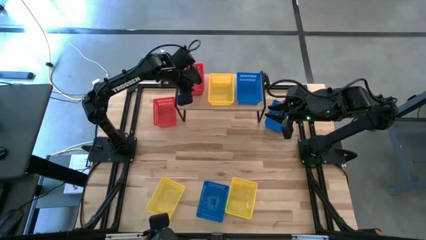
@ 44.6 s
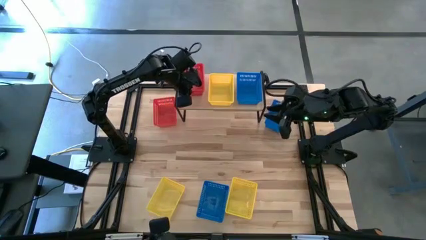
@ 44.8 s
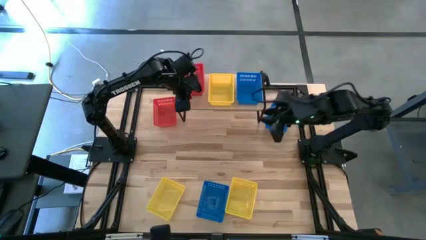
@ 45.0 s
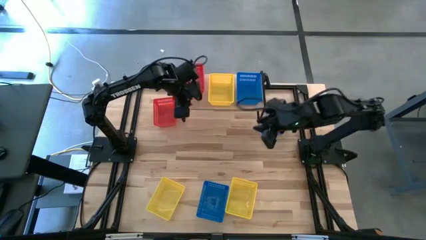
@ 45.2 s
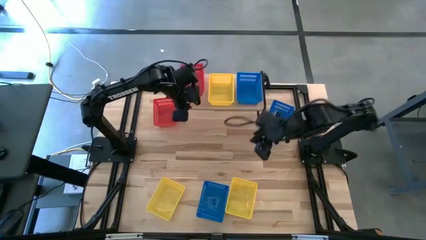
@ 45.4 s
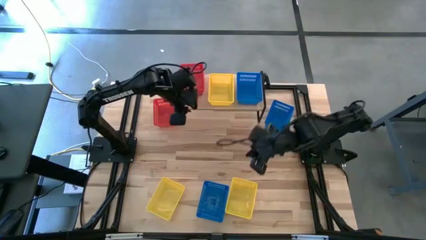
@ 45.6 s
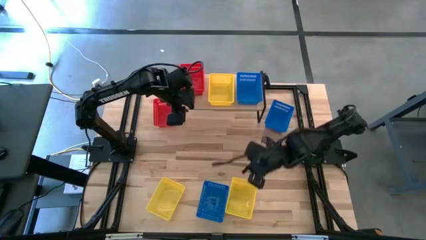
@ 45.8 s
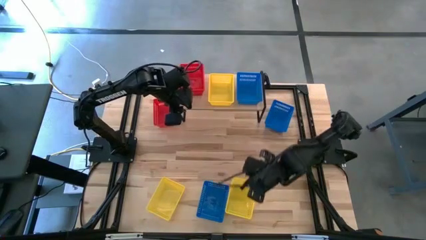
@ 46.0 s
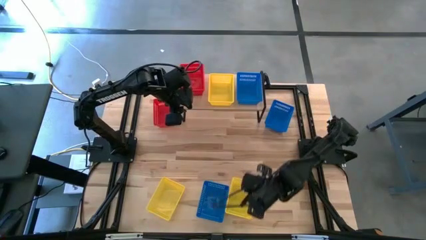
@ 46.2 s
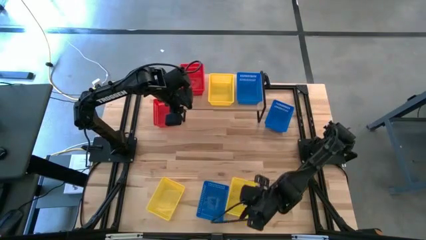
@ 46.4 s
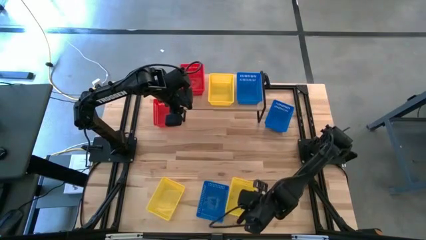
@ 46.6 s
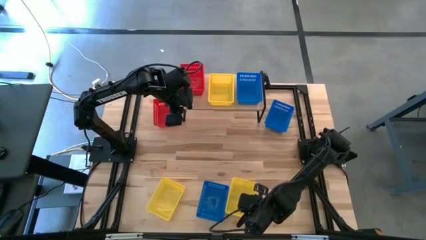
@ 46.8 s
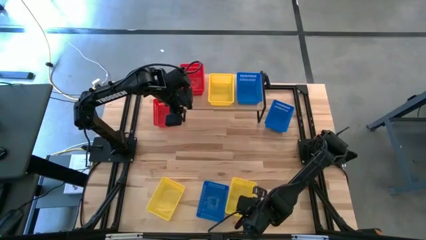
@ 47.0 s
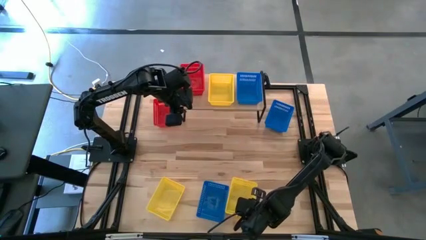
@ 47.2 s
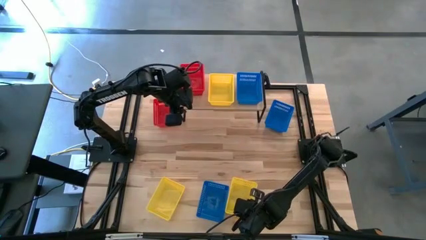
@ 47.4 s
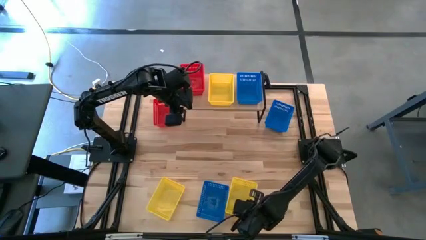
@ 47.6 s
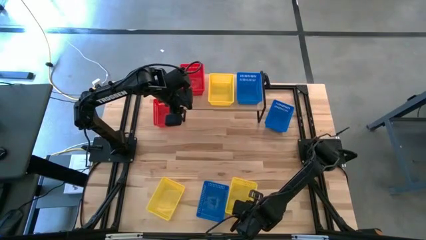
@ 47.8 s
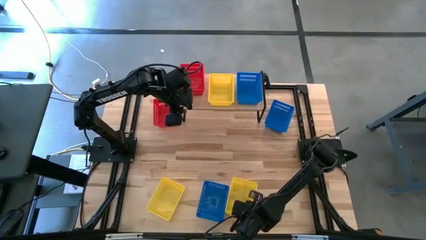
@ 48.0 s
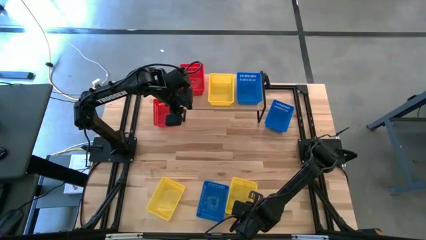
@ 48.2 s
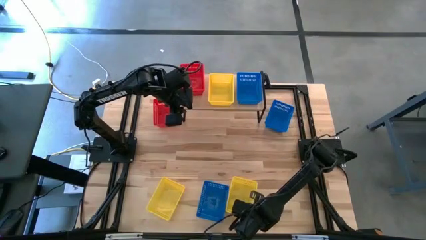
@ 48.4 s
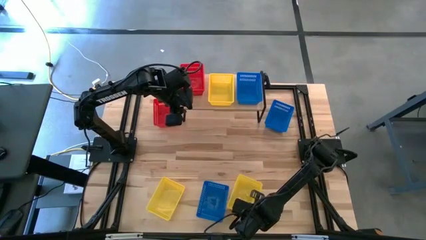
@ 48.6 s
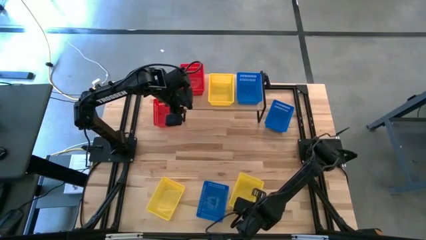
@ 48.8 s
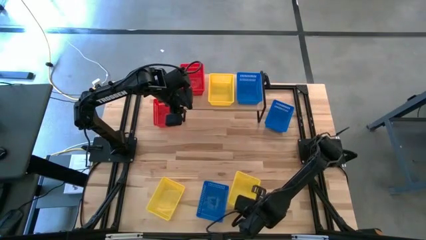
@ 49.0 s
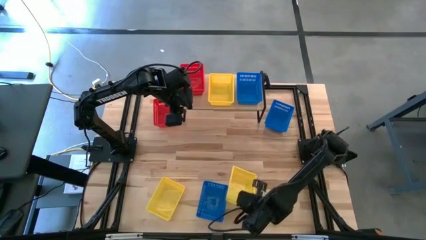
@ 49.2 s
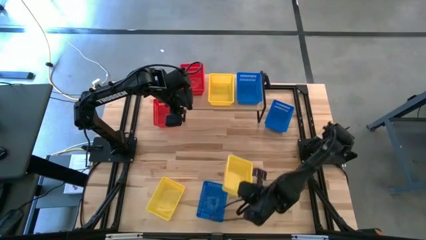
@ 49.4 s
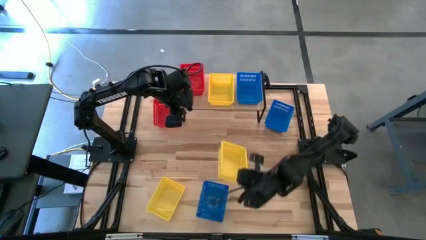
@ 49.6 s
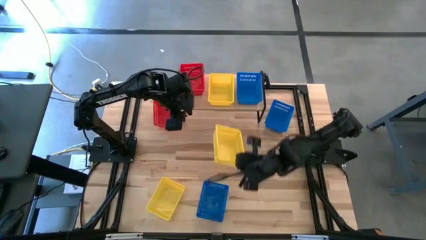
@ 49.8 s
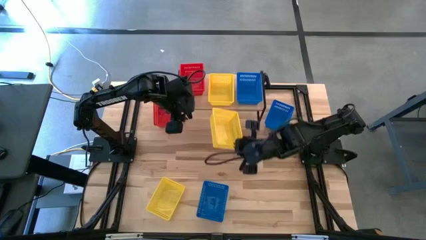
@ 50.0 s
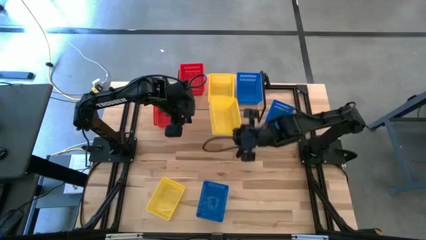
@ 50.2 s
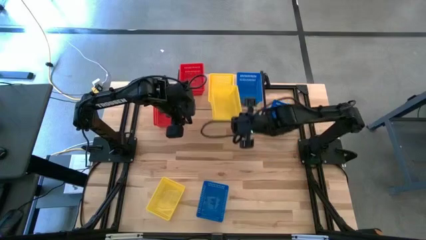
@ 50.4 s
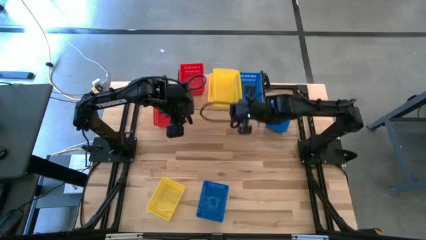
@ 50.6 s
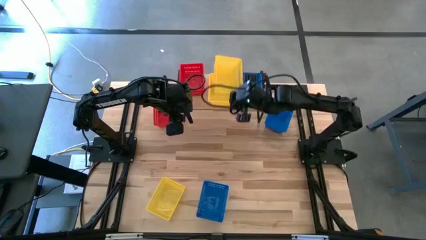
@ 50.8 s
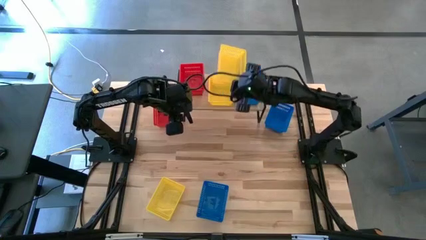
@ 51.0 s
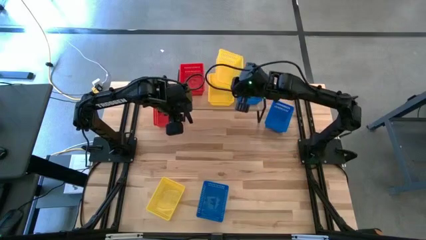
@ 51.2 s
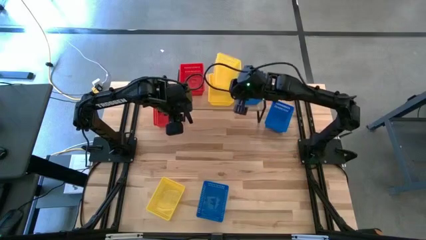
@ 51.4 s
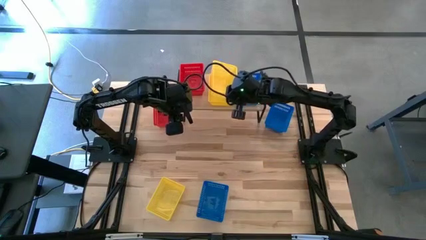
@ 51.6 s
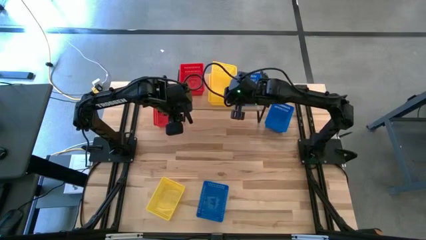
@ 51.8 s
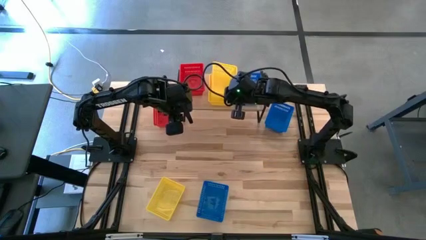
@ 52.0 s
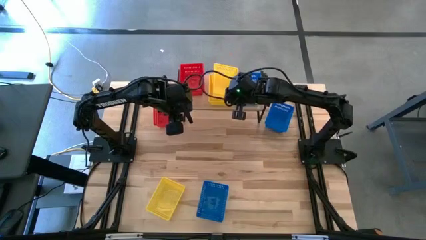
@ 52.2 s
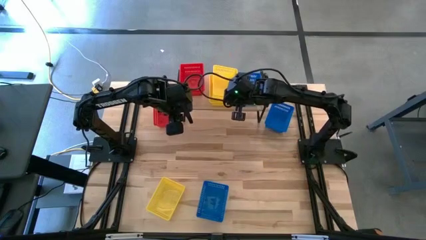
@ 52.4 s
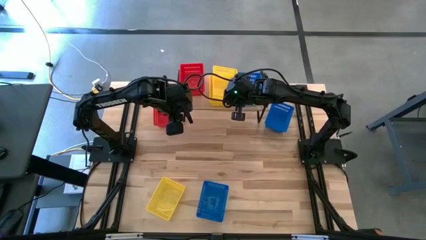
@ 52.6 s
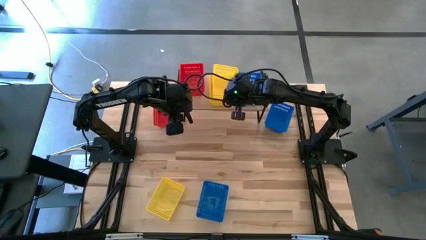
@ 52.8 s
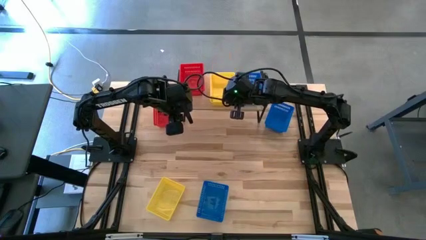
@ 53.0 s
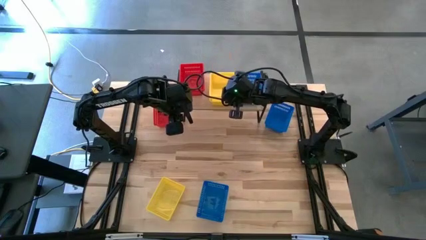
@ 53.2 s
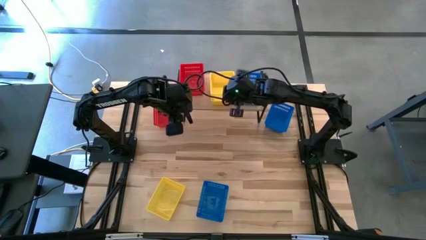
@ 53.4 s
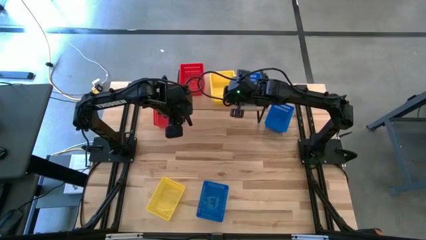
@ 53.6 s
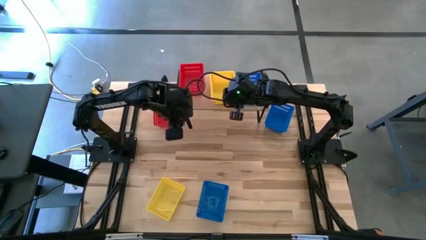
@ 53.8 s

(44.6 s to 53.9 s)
Task: Stack baskets on shelf by color
Stack the right yellow bin on top of the yellow bin on the shelf
